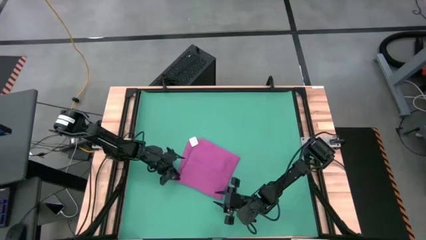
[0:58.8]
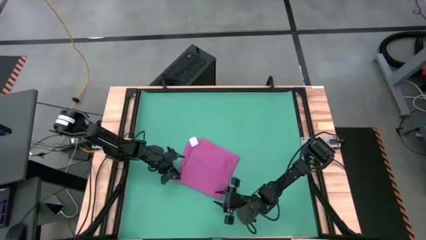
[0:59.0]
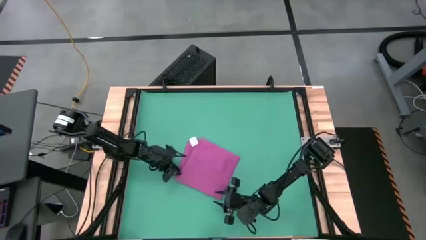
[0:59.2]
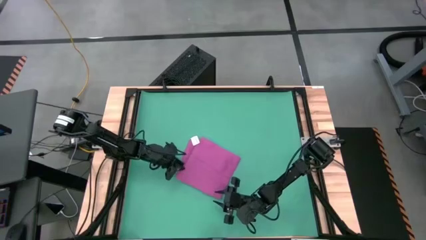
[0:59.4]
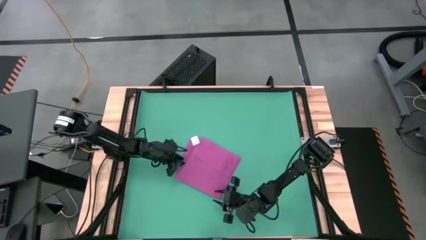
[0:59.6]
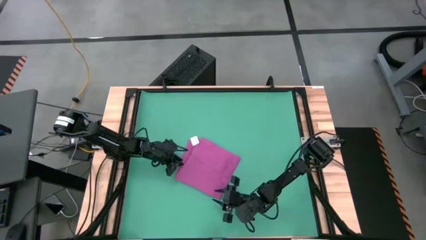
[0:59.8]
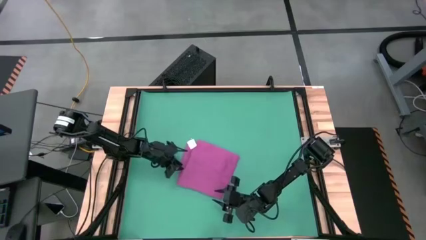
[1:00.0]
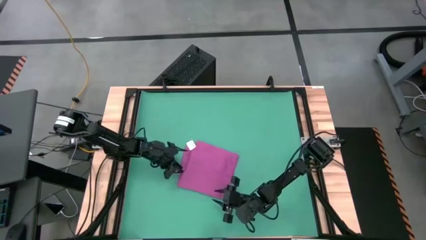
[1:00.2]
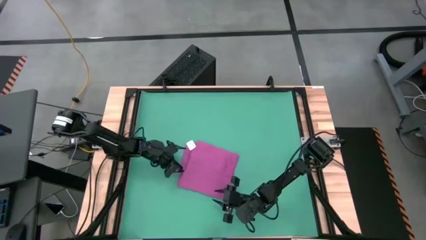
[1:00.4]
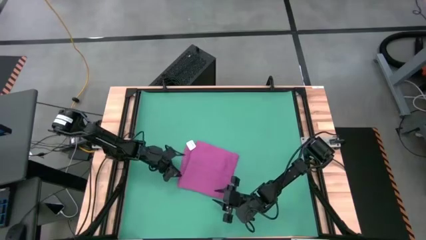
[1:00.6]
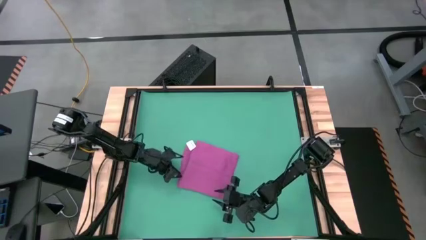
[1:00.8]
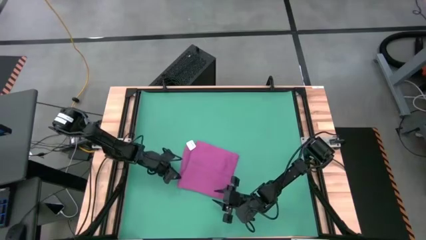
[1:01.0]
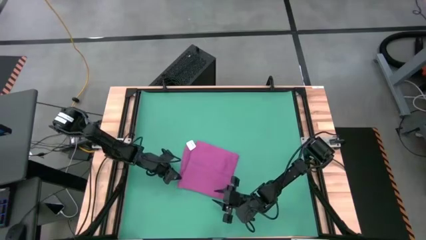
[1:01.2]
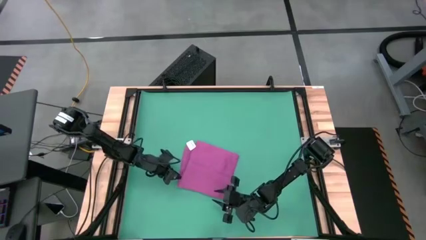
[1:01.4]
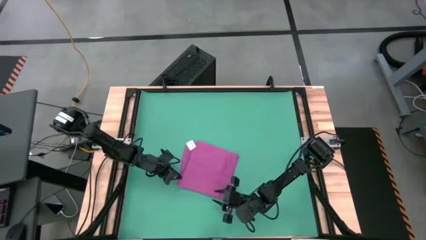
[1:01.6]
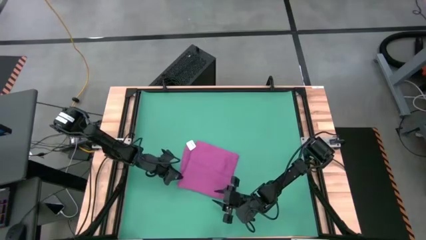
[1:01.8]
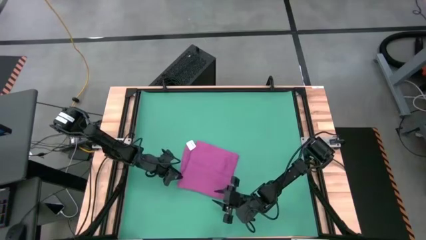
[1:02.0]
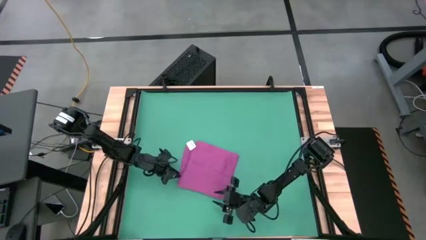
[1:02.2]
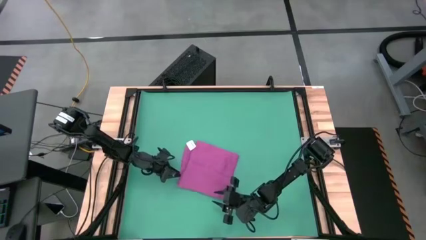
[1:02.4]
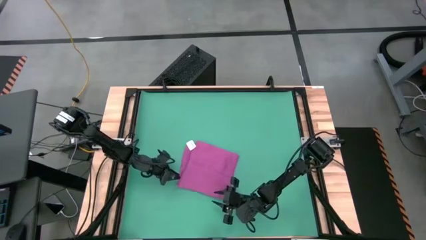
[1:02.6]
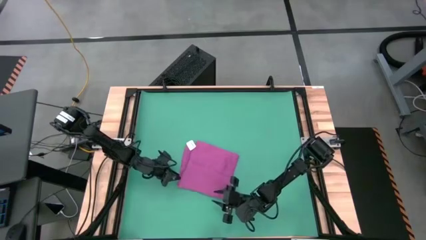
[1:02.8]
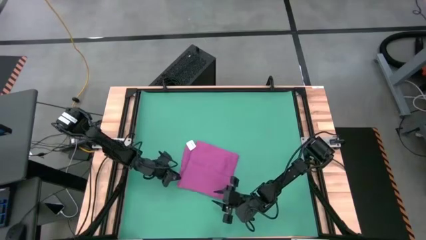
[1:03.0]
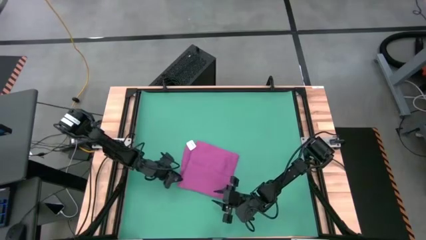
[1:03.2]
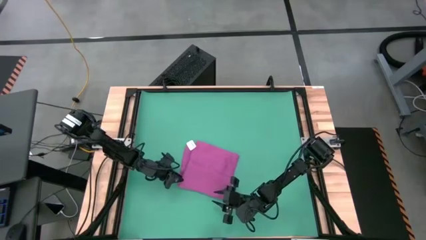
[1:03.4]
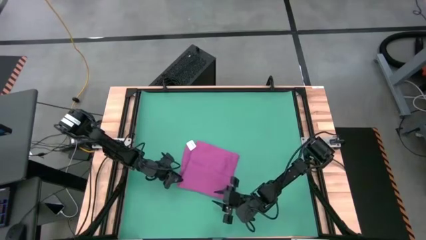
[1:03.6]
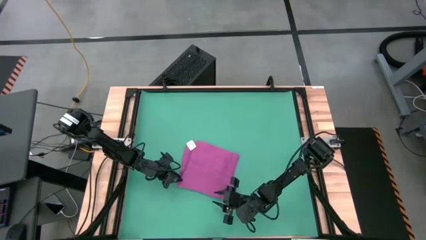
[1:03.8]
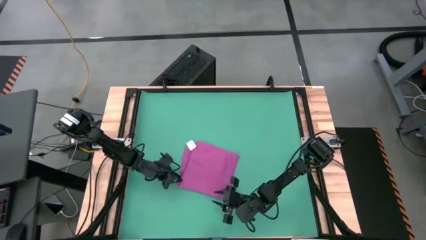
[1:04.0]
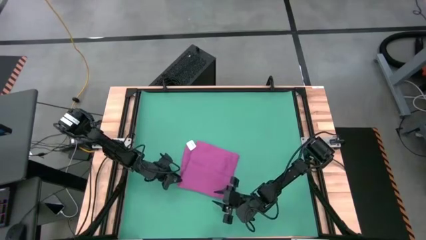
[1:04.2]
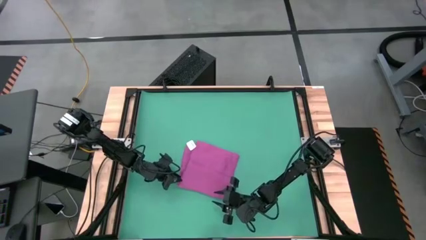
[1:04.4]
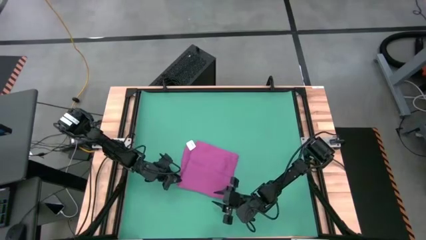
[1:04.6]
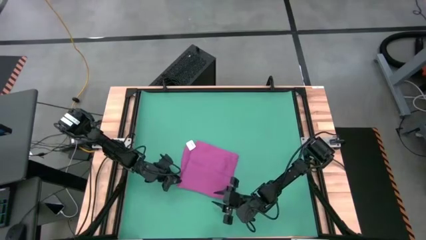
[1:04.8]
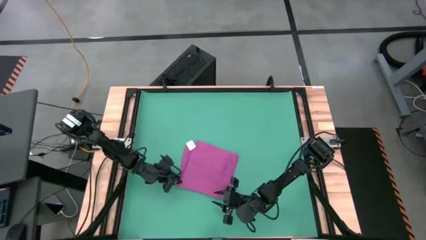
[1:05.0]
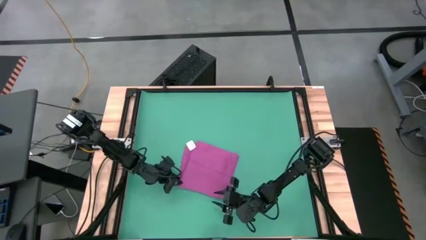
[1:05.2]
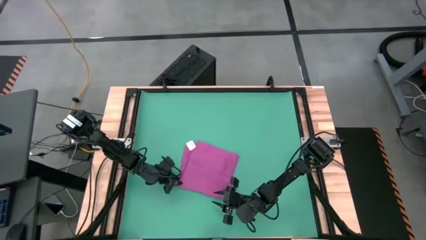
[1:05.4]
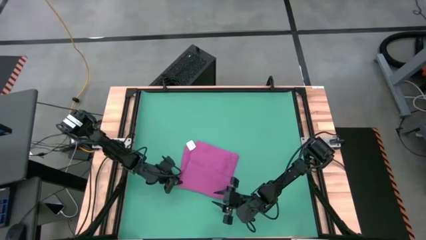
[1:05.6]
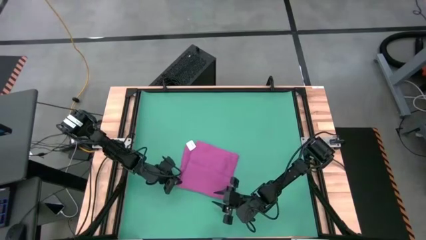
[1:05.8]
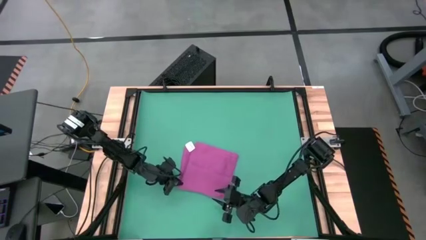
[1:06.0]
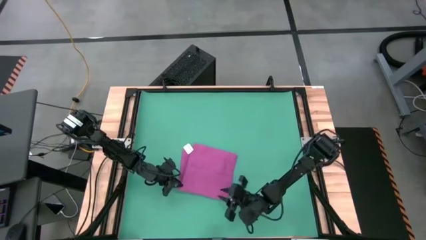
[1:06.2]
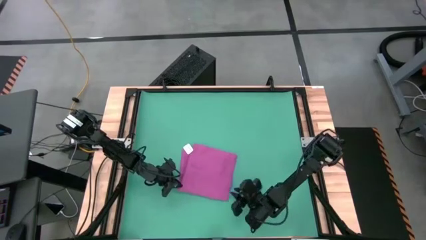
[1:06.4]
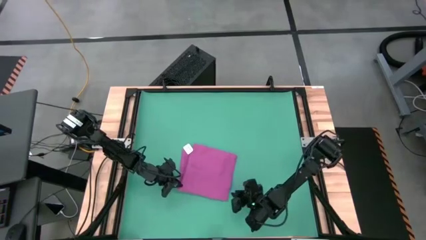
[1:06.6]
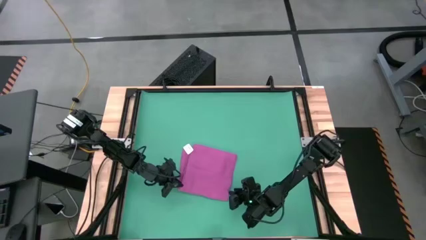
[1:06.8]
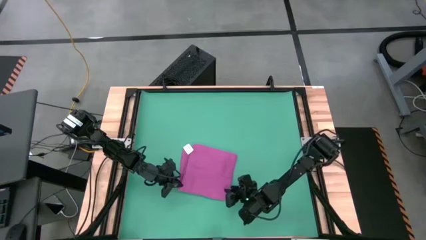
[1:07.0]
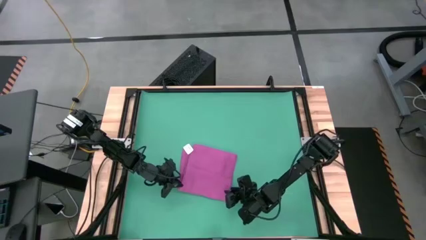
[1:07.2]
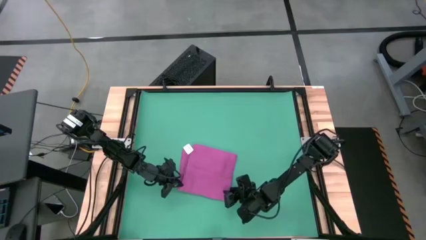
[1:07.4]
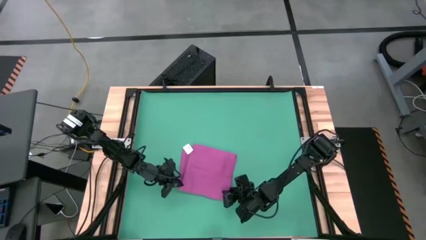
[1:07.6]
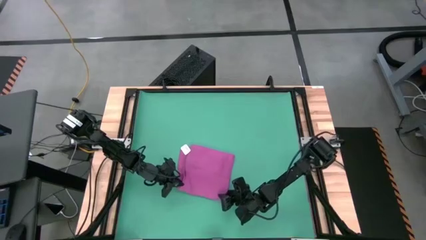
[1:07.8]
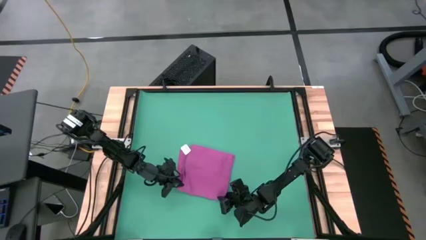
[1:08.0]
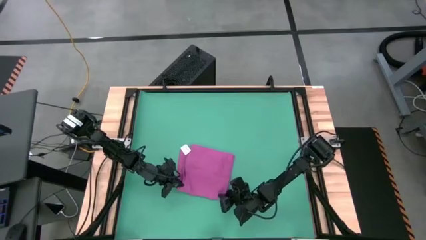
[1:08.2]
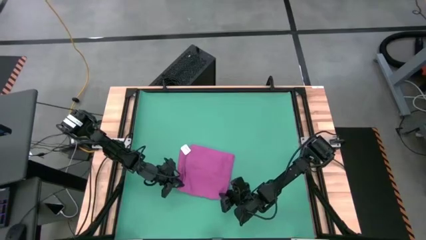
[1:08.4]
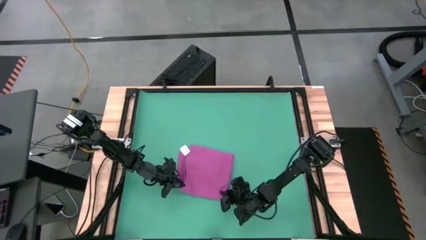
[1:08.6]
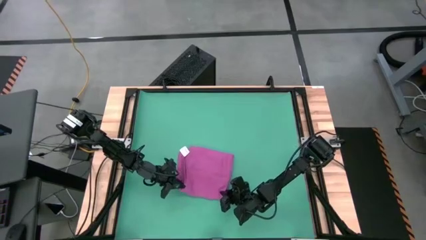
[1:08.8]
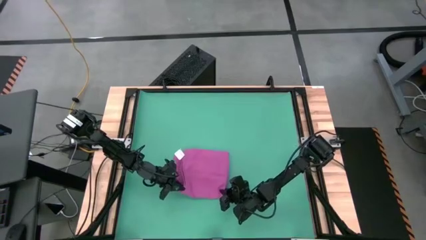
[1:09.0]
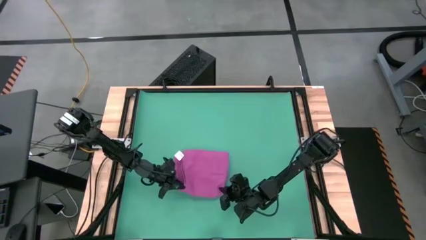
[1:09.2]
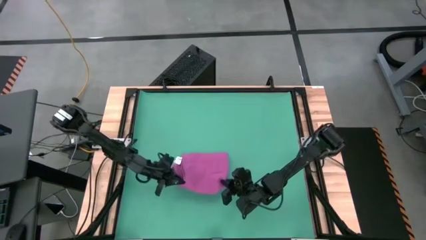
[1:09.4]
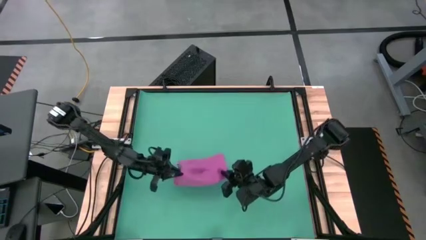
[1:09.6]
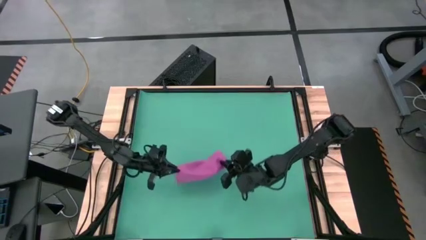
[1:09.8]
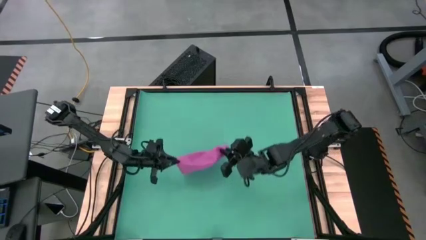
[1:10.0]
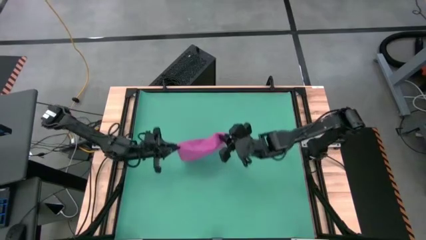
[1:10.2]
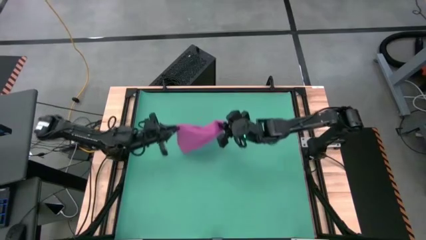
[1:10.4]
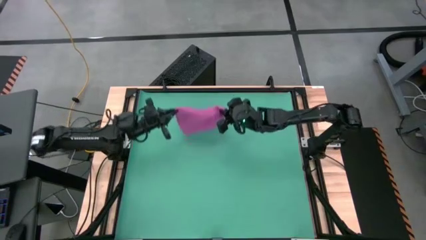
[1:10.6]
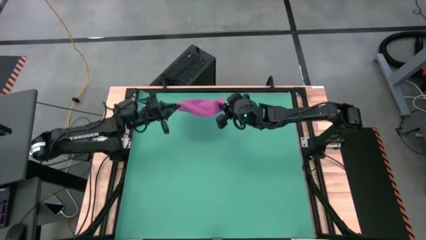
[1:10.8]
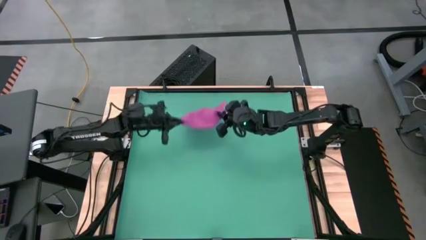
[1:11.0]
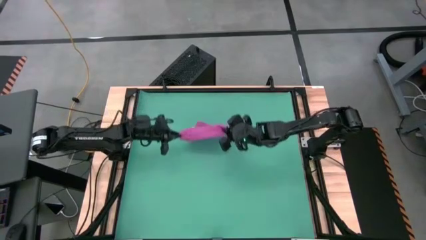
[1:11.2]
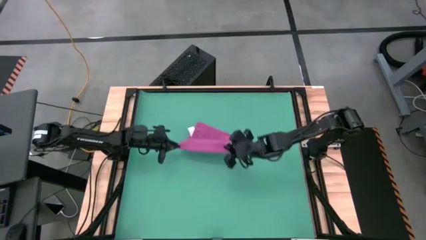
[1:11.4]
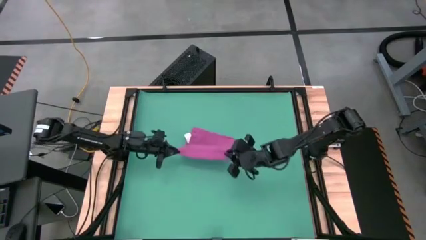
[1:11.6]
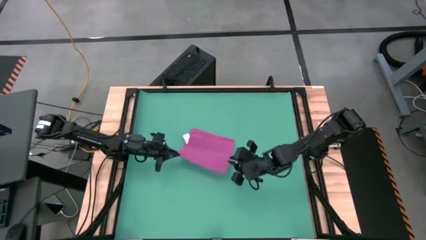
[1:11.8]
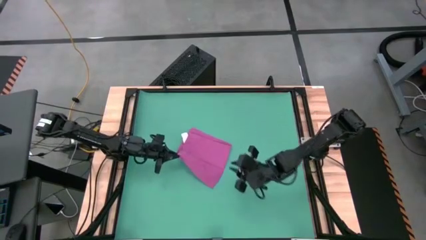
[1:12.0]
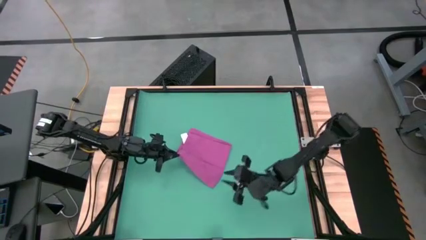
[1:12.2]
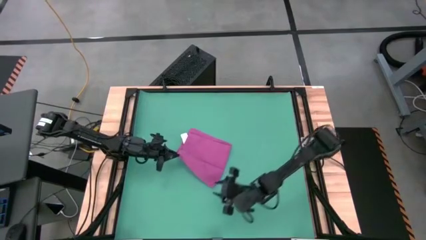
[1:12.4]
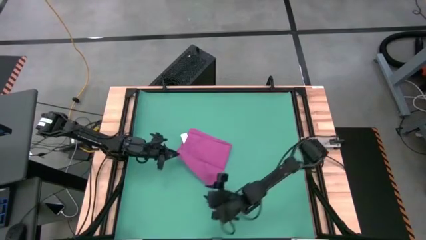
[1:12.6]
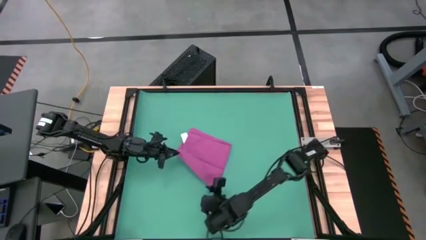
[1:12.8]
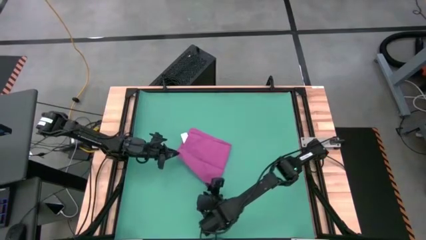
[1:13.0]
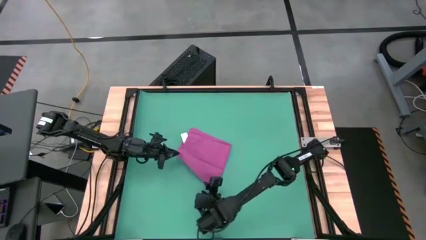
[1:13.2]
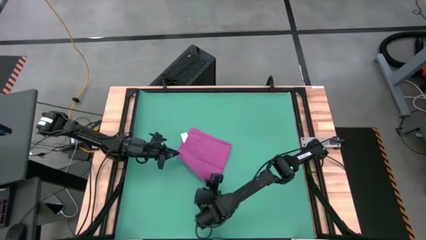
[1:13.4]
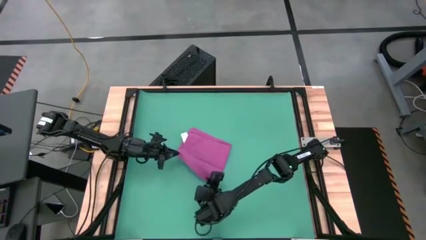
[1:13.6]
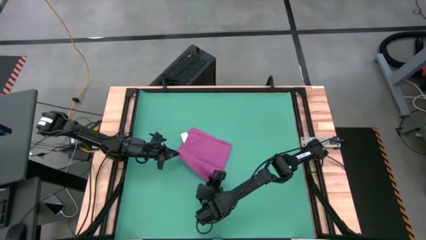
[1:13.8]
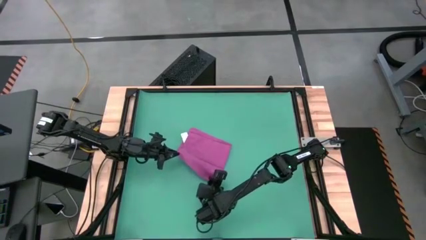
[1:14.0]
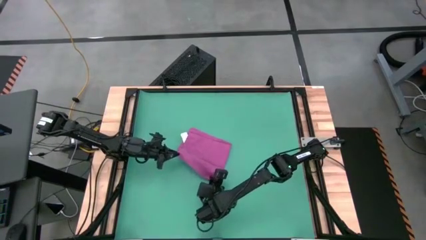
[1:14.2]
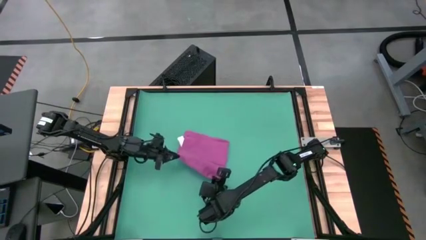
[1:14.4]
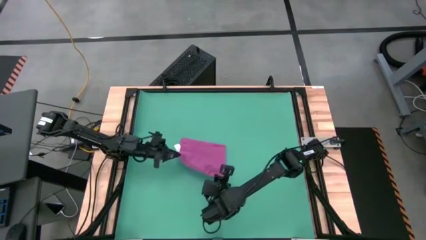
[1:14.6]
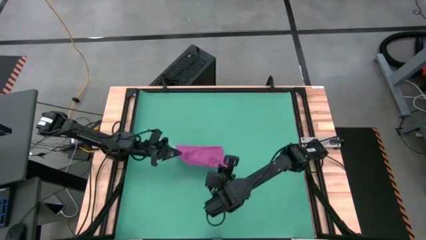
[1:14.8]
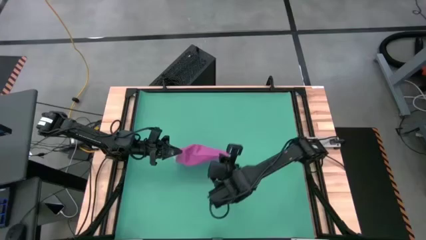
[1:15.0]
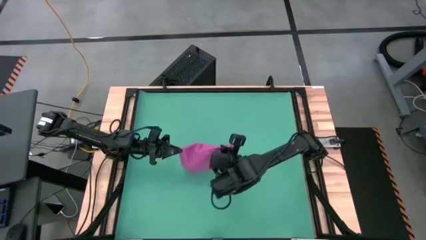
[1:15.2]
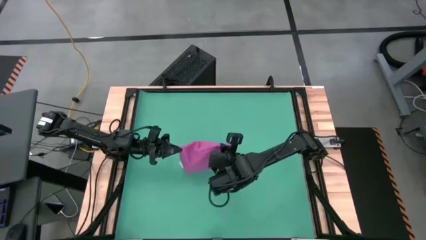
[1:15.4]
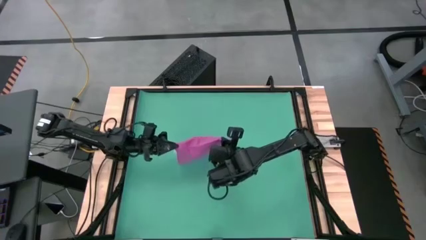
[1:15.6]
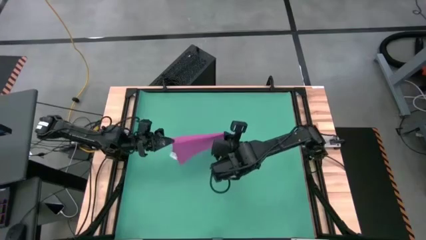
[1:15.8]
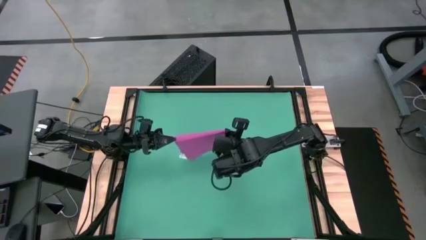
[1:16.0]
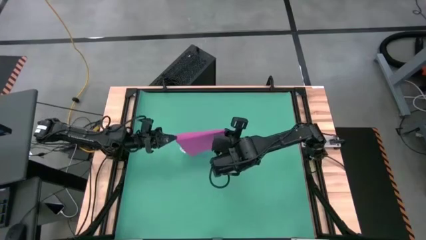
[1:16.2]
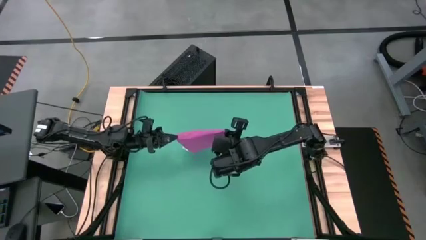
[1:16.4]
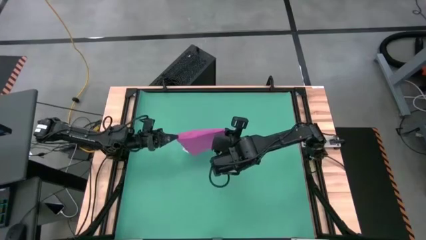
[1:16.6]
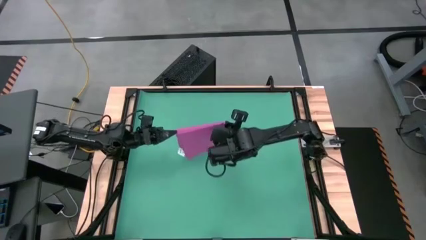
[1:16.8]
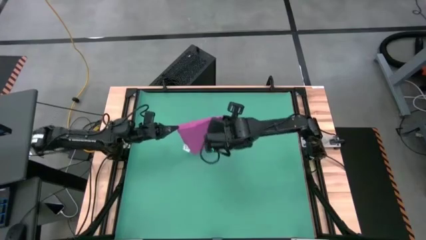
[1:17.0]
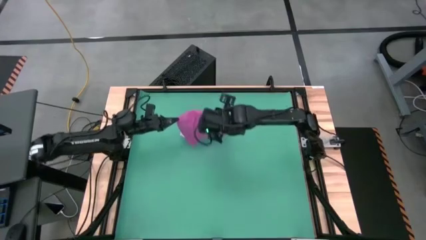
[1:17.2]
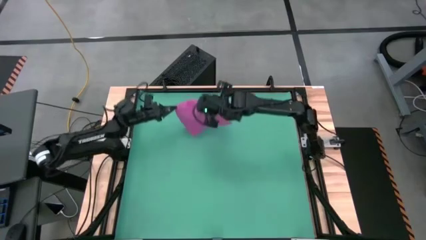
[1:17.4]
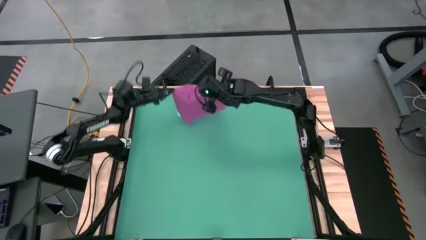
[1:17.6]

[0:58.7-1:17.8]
Task: Roll towel
Fold the pink towel
